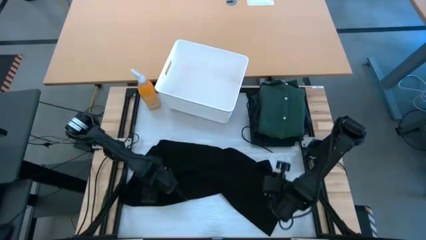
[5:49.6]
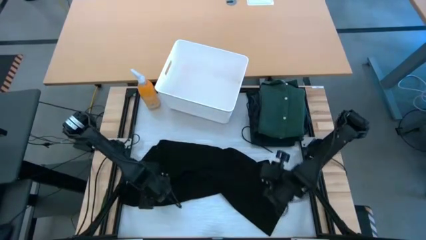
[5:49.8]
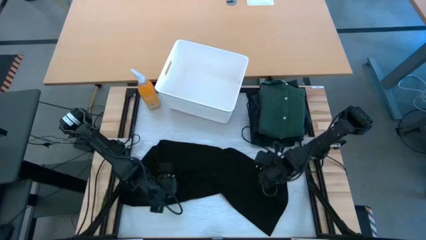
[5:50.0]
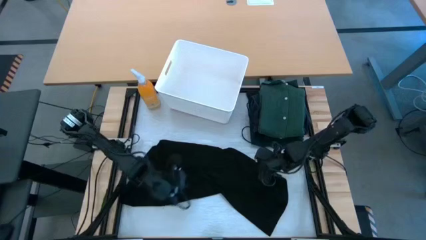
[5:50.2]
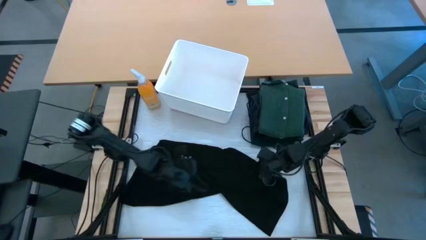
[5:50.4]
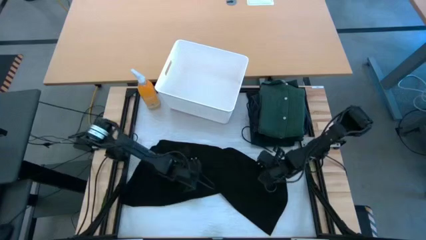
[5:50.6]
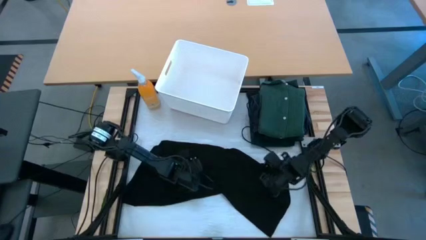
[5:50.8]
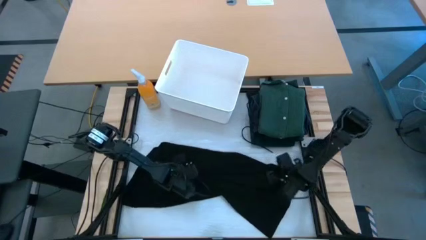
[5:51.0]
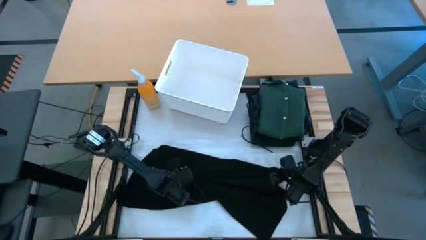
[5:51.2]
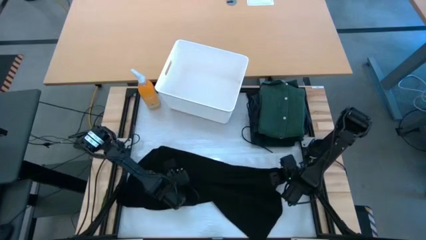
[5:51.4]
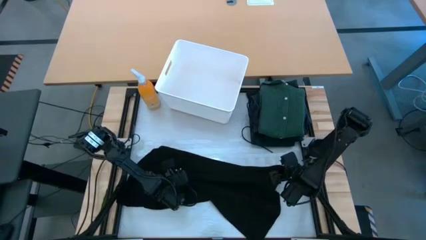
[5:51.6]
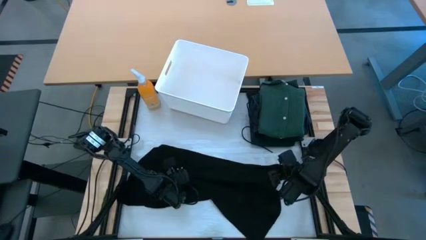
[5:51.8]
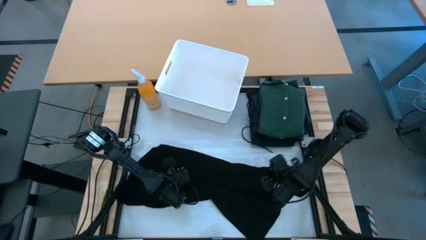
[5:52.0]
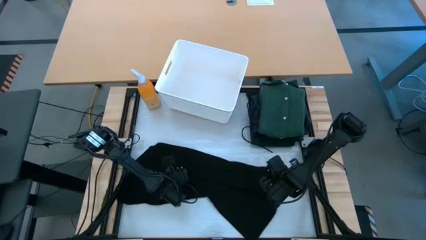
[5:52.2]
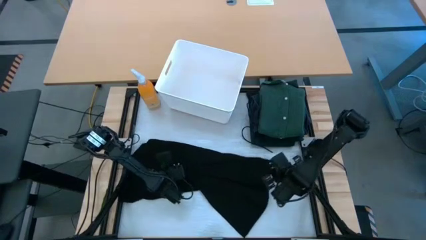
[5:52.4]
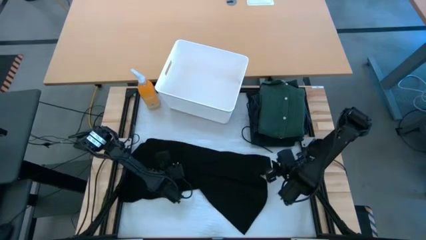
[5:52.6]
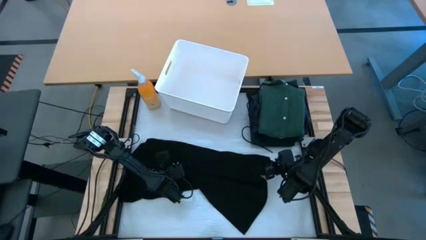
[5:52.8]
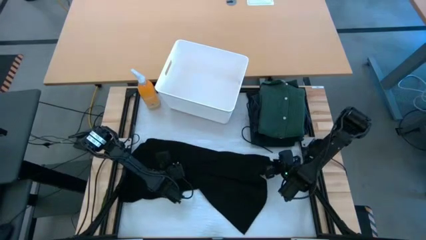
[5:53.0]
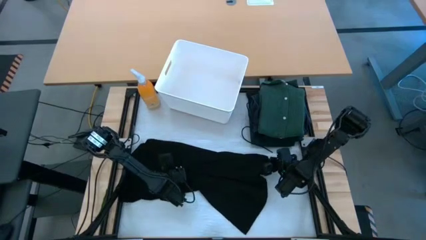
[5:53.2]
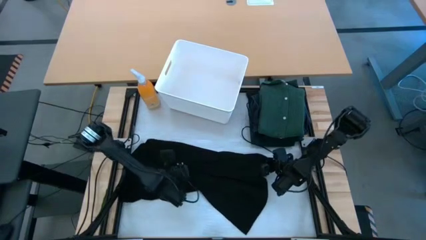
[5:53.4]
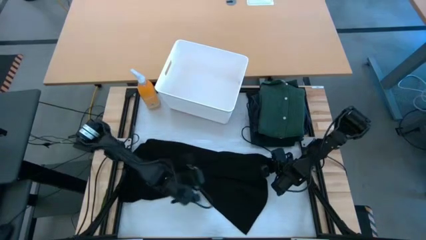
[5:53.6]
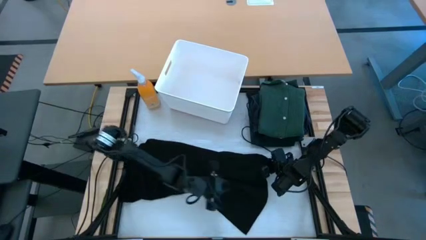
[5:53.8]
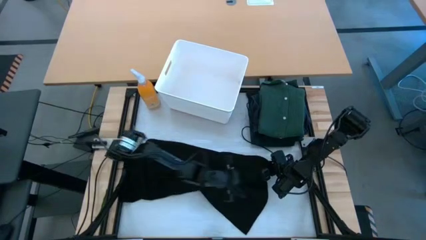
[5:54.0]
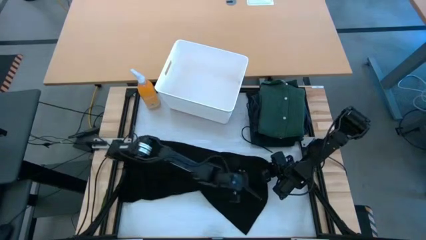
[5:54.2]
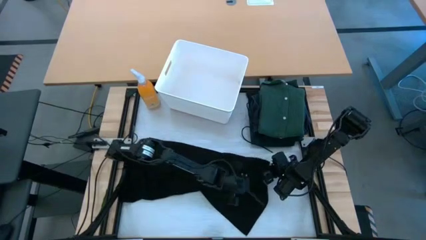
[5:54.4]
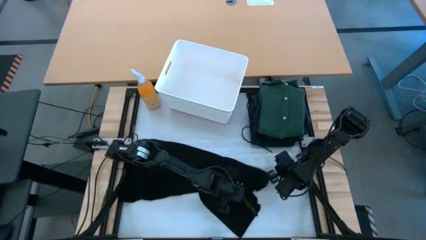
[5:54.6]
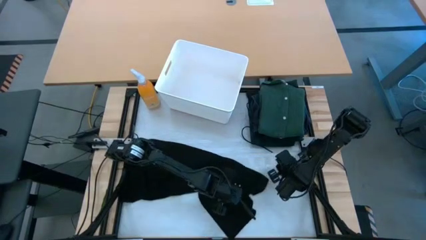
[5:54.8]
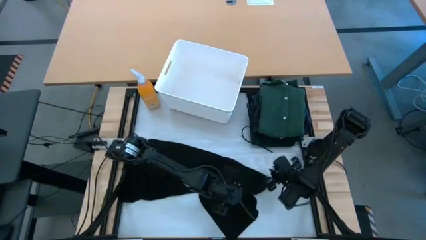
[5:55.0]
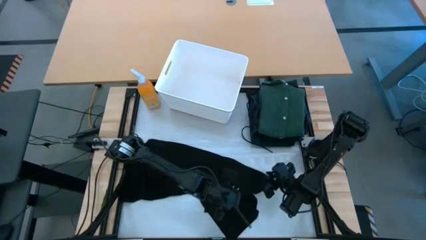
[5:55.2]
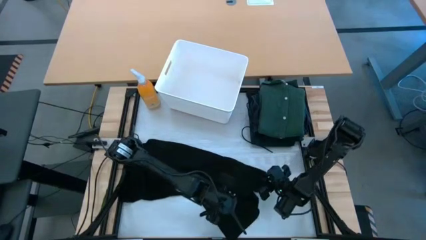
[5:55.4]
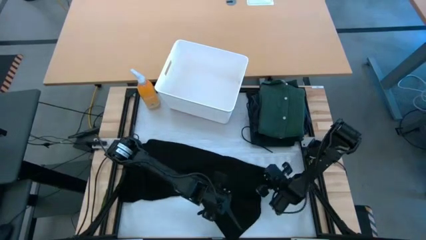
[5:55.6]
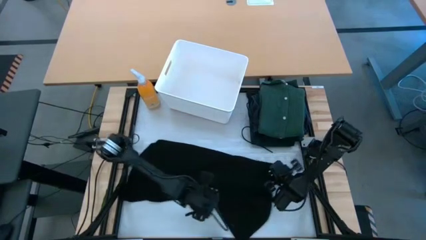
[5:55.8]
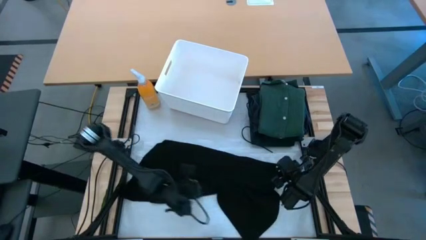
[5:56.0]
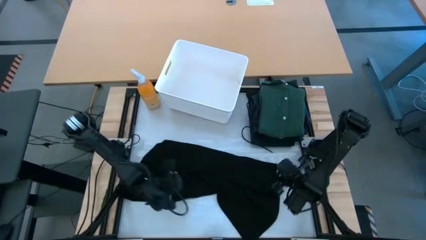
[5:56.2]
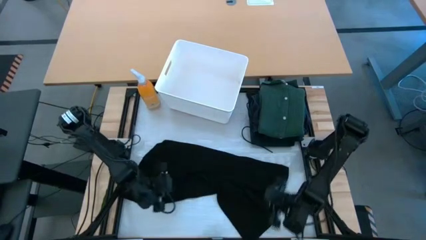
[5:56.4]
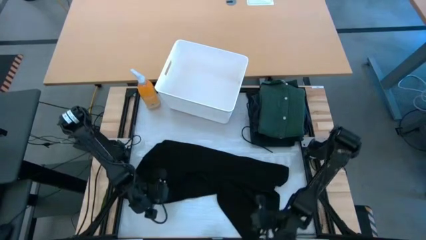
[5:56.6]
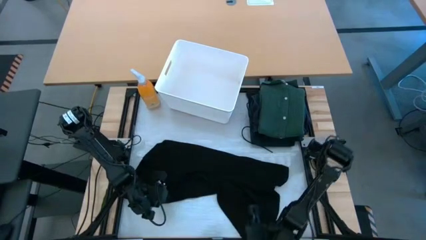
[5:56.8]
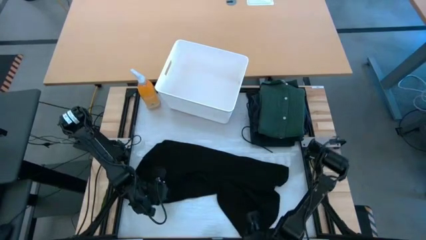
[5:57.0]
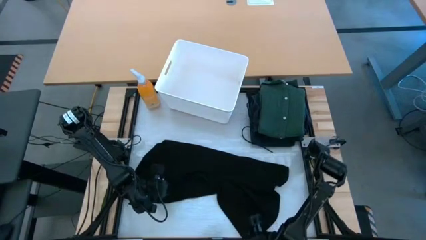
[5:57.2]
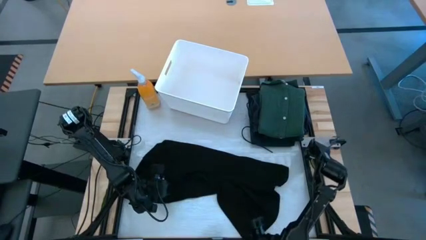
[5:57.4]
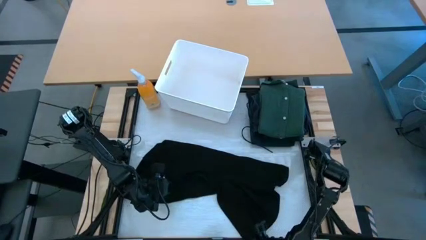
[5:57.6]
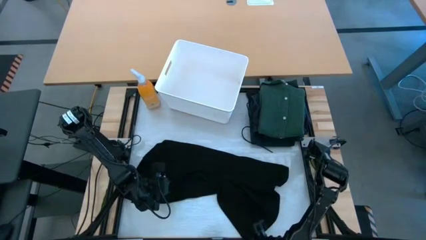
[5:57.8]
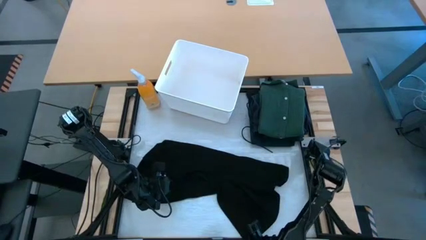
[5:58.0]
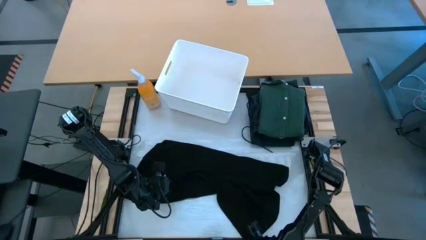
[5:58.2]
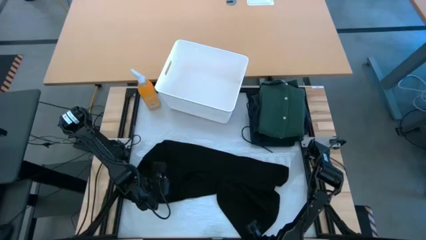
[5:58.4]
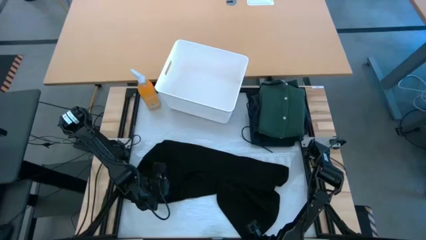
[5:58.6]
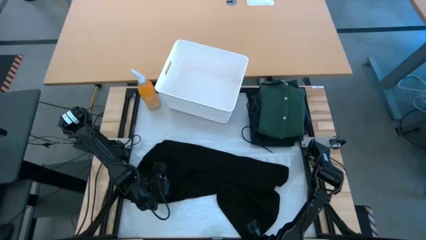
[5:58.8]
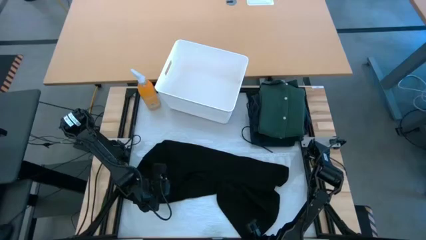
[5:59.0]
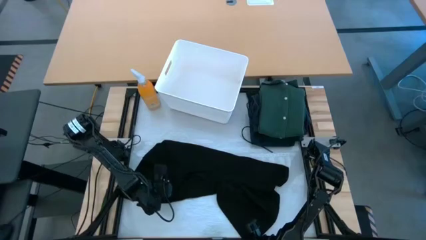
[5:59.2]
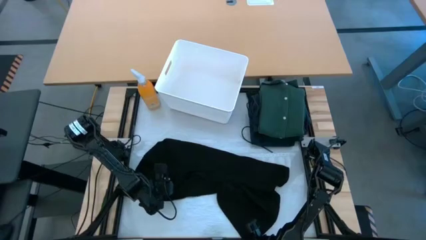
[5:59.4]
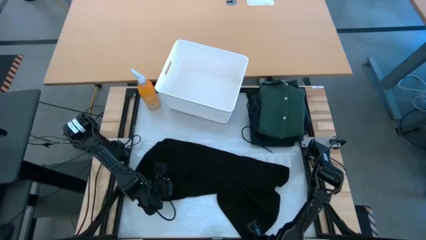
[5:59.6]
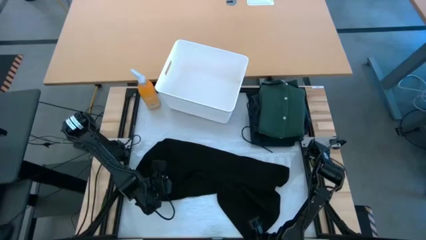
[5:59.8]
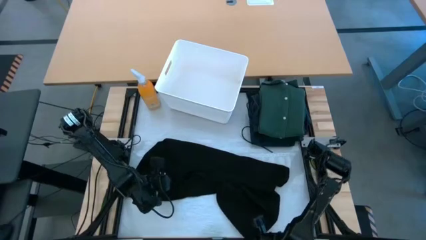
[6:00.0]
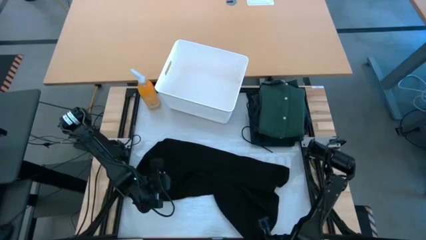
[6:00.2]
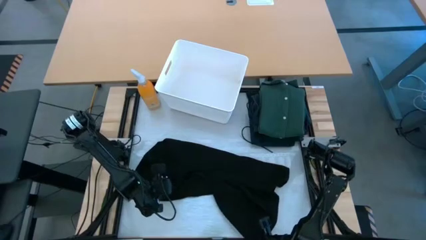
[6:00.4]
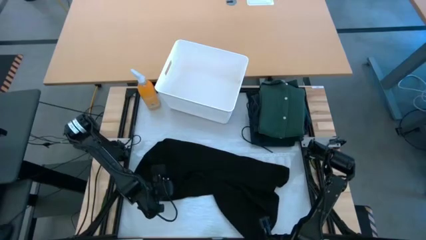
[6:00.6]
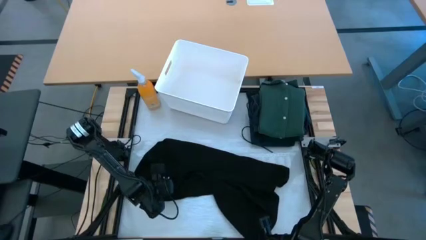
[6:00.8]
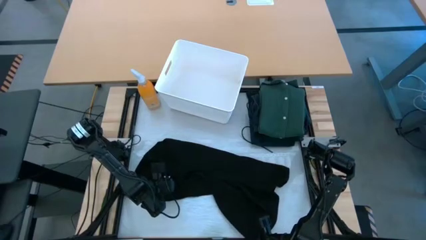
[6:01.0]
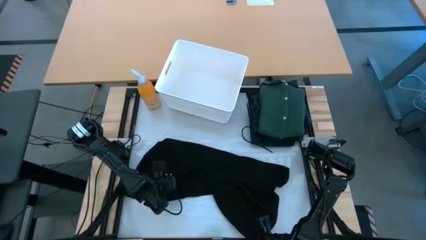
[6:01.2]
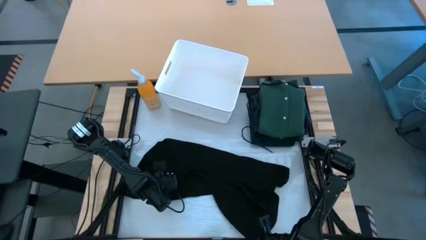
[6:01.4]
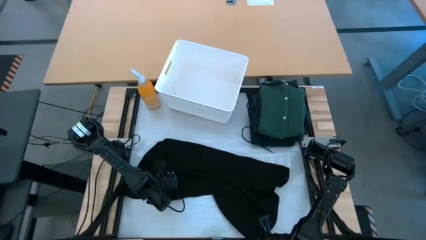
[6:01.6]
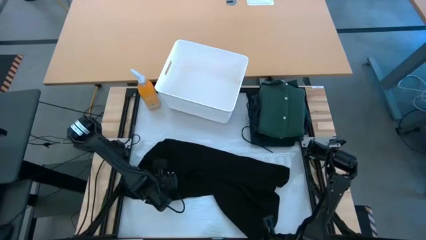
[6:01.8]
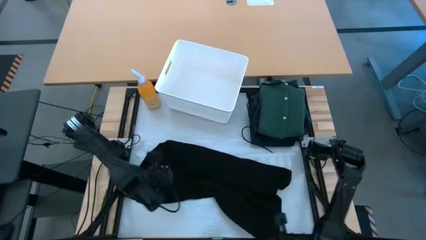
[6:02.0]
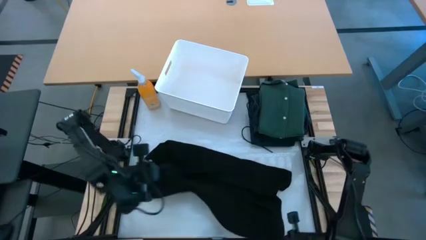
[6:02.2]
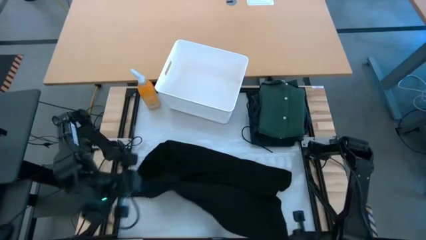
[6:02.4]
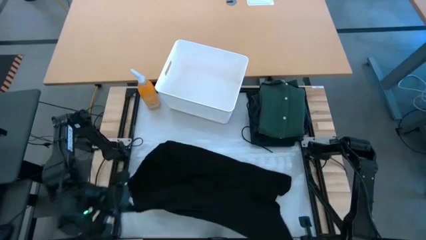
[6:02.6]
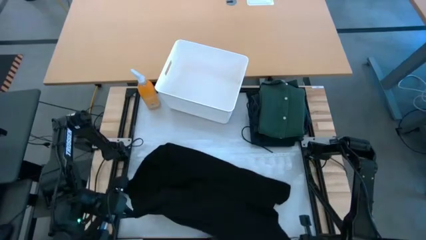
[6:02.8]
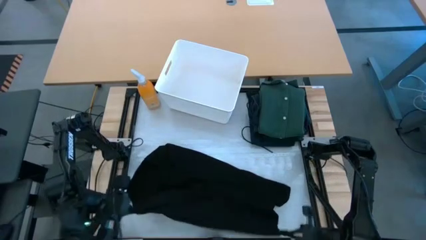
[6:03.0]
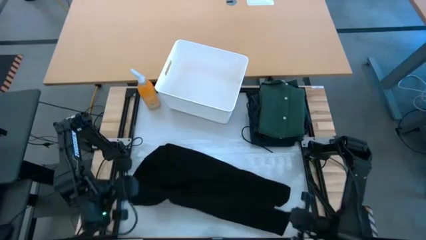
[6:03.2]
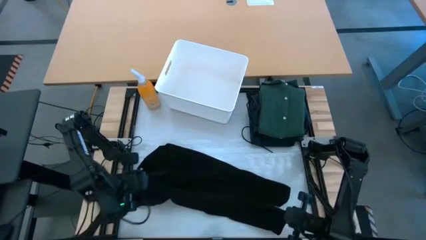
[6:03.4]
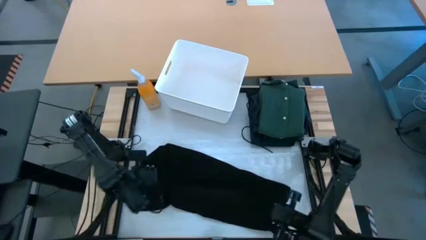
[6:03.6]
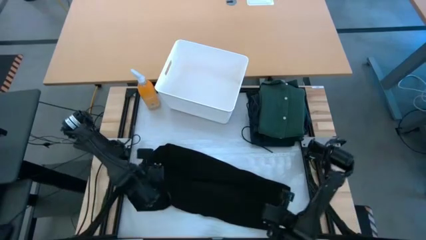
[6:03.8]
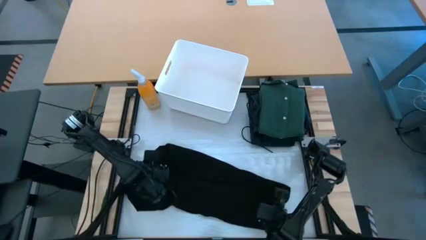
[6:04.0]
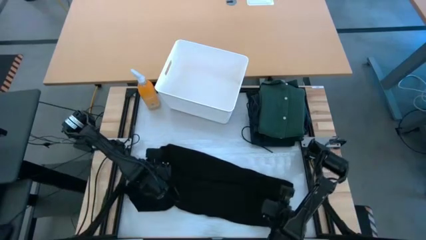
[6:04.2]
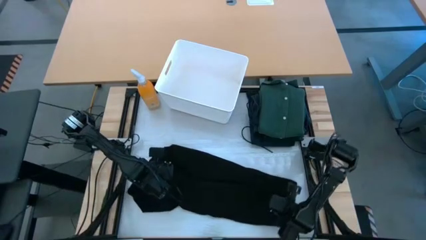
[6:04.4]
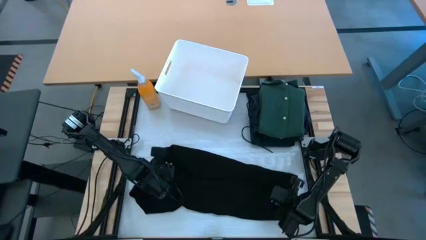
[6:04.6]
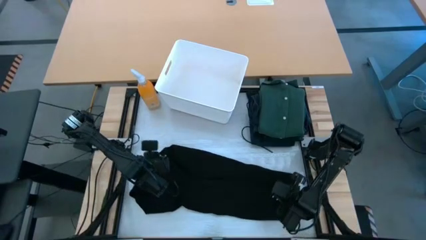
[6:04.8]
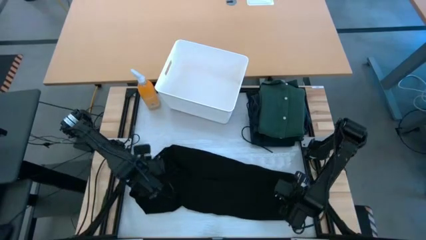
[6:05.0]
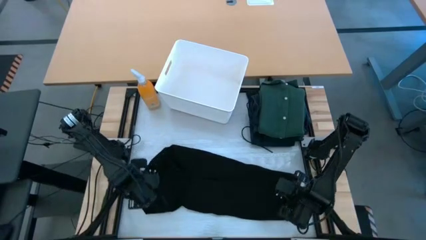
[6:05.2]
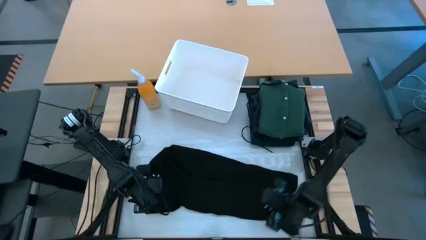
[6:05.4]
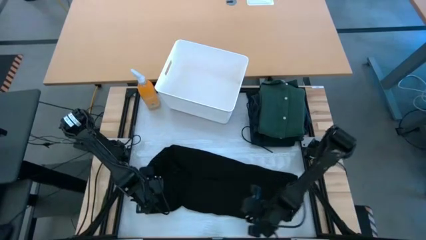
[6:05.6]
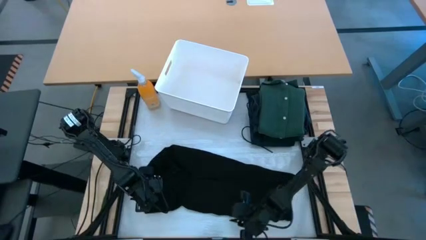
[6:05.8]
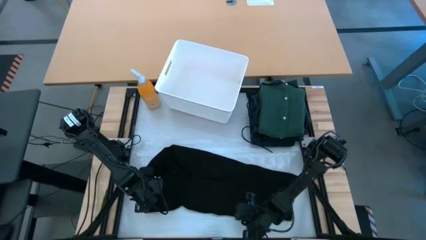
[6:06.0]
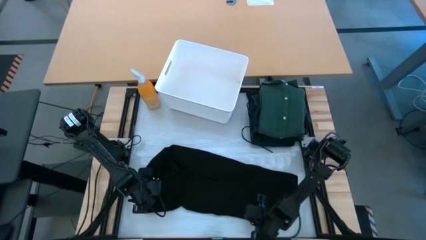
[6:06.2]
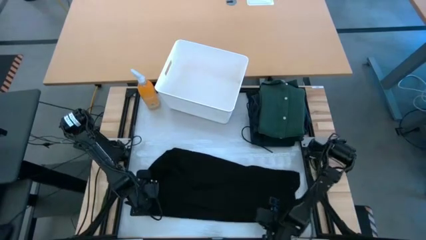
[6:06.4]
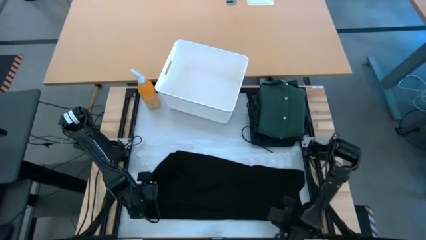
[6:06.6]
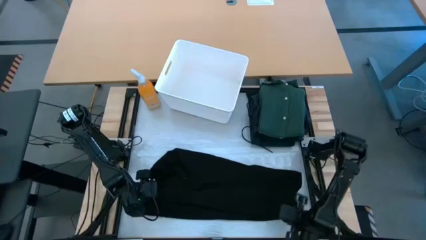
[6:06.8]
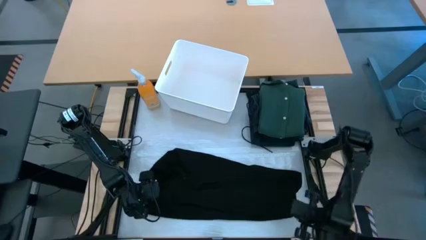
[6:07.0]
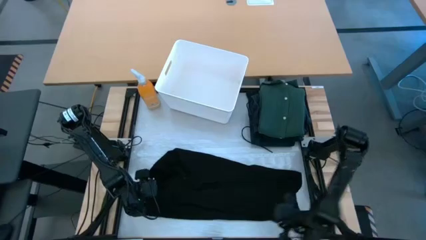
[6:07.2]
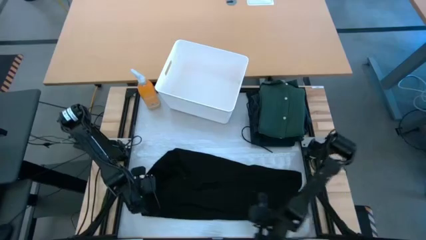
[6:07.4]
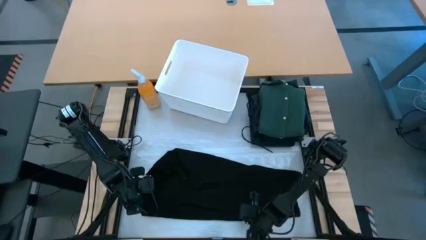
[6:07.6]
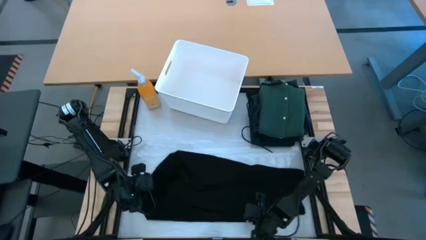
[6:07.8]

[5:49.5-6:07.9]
Task: Fold laundry
Fold the black shirt
